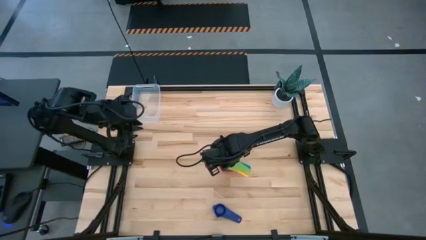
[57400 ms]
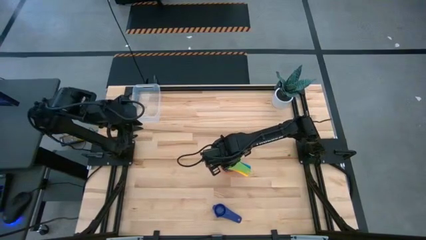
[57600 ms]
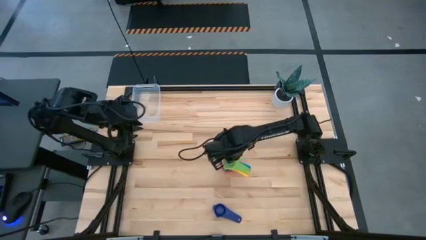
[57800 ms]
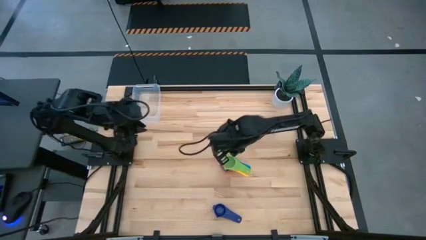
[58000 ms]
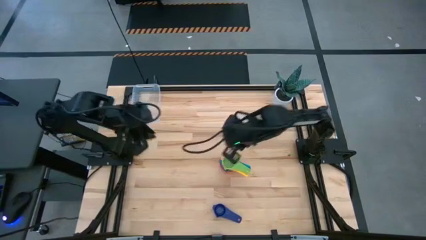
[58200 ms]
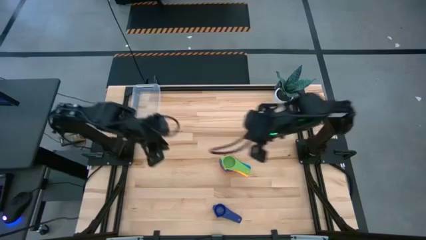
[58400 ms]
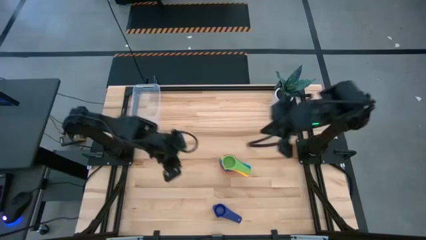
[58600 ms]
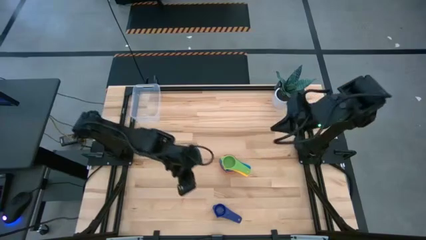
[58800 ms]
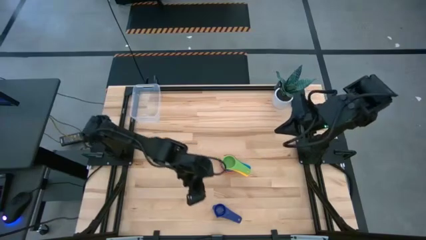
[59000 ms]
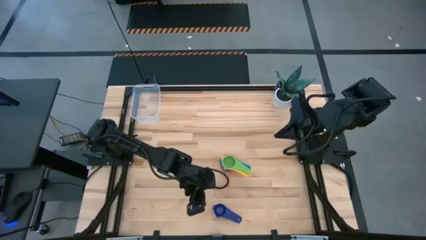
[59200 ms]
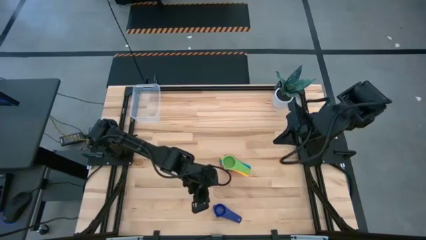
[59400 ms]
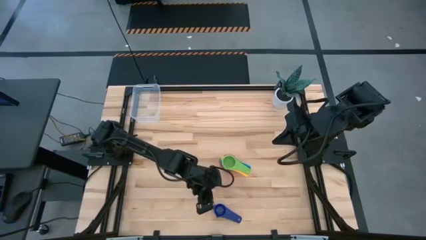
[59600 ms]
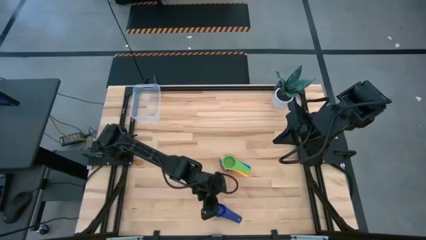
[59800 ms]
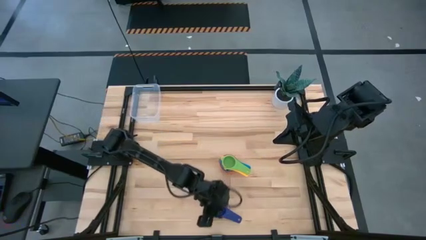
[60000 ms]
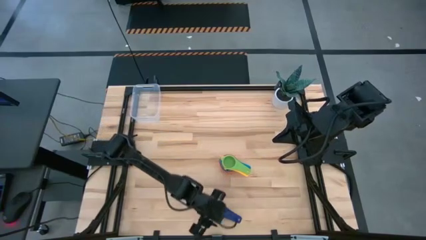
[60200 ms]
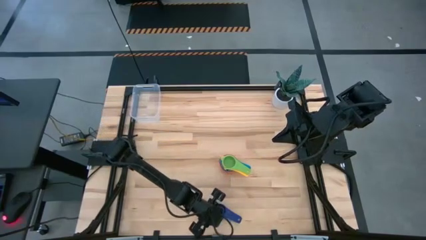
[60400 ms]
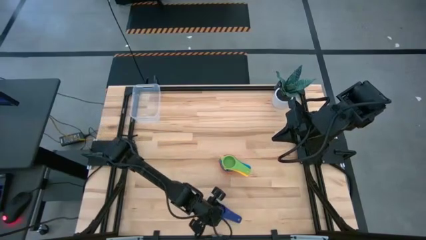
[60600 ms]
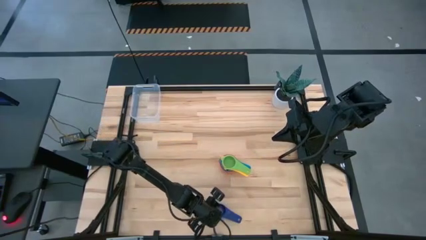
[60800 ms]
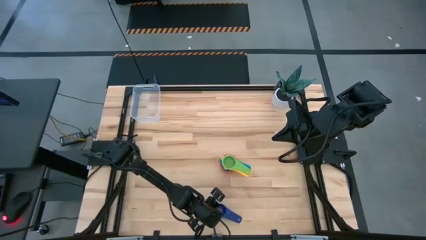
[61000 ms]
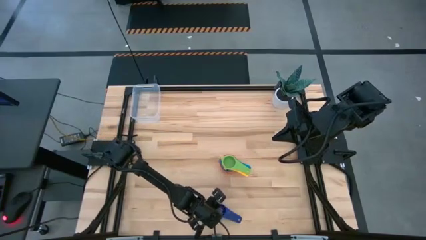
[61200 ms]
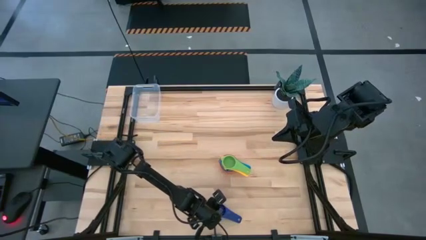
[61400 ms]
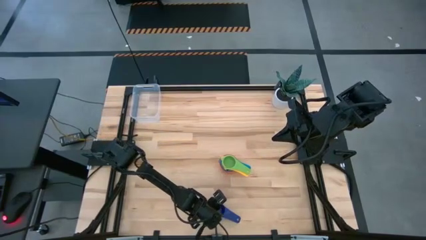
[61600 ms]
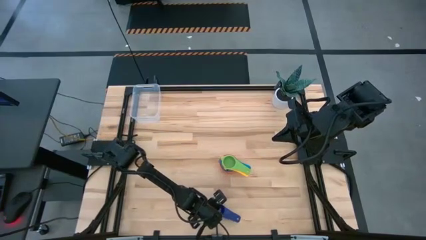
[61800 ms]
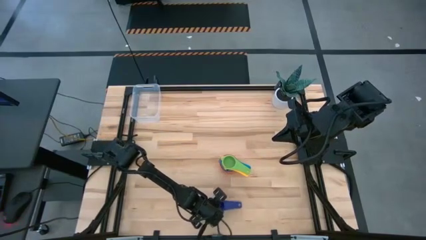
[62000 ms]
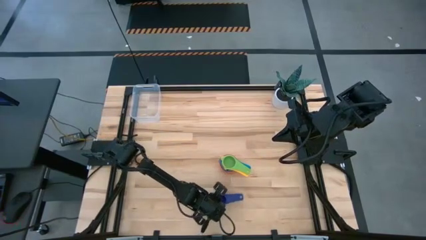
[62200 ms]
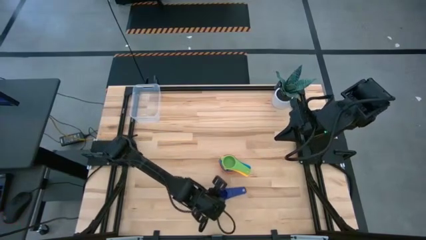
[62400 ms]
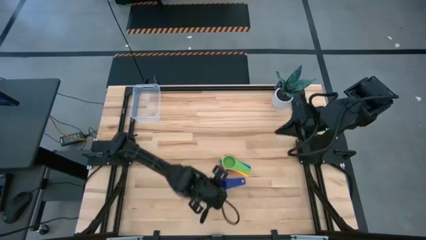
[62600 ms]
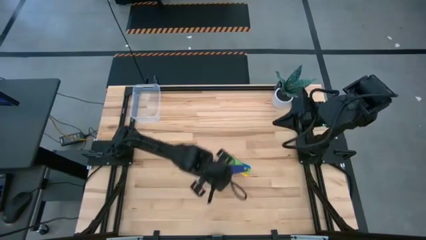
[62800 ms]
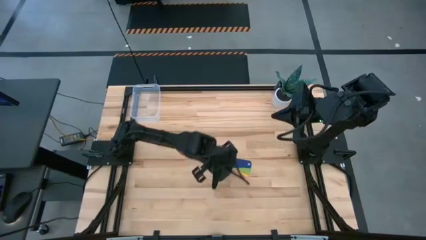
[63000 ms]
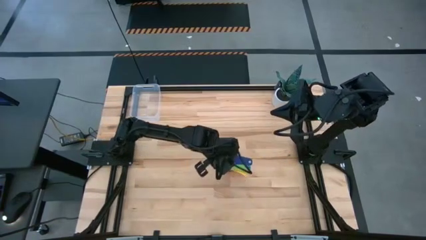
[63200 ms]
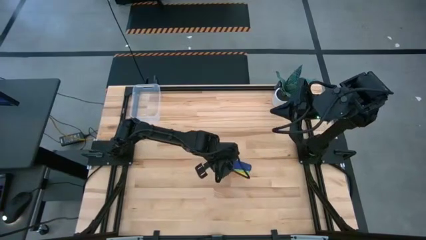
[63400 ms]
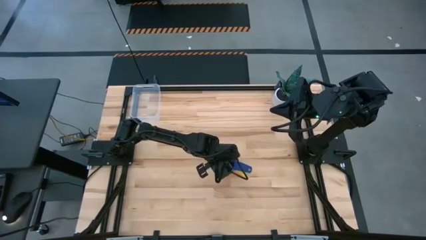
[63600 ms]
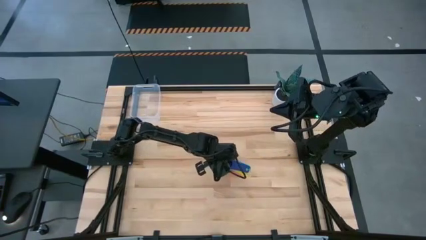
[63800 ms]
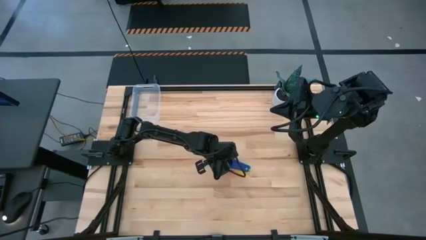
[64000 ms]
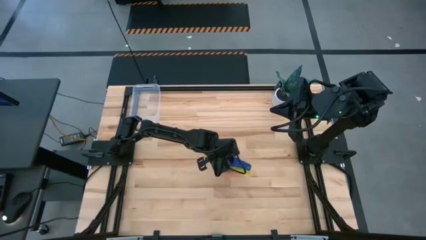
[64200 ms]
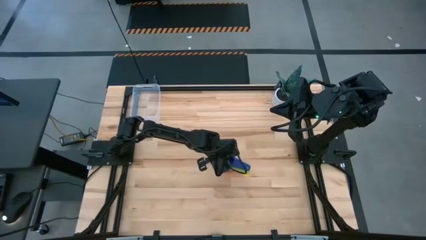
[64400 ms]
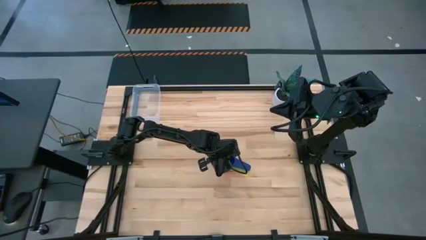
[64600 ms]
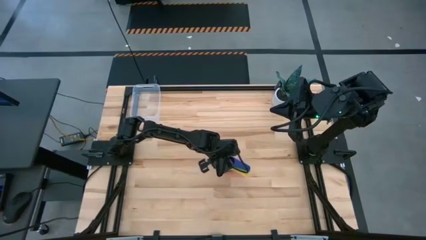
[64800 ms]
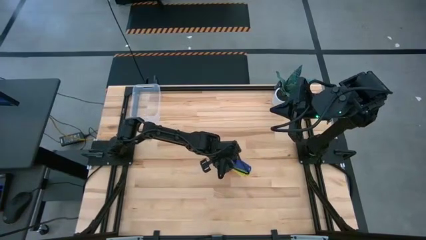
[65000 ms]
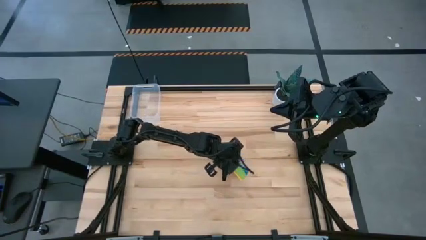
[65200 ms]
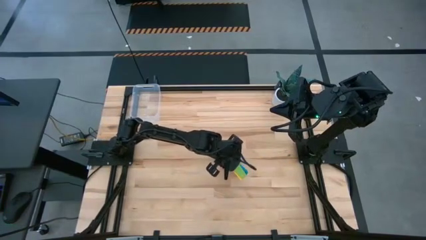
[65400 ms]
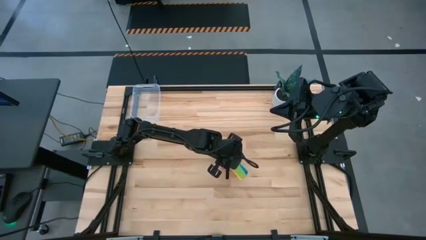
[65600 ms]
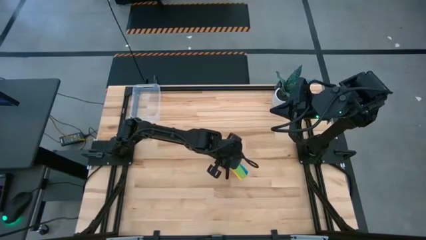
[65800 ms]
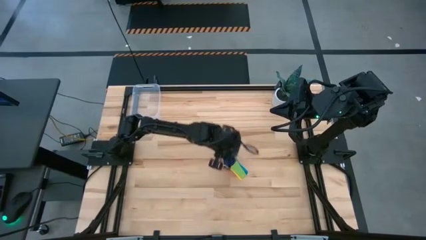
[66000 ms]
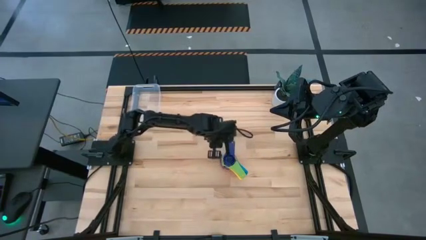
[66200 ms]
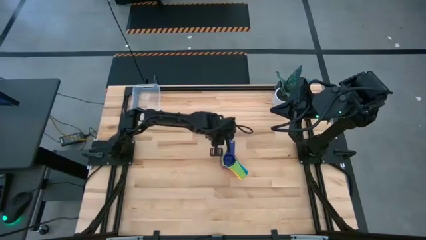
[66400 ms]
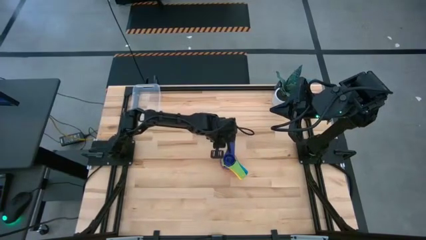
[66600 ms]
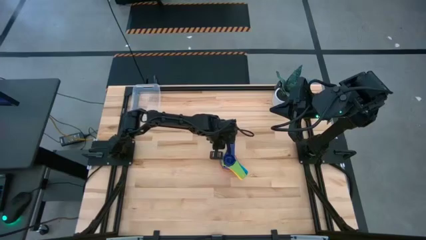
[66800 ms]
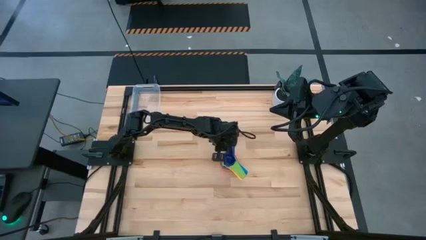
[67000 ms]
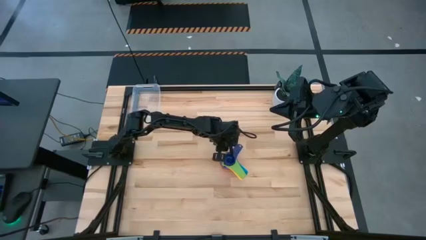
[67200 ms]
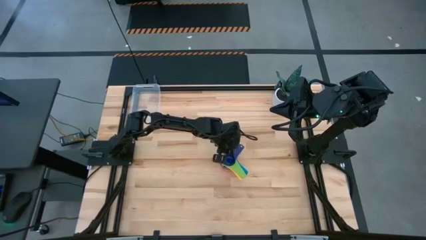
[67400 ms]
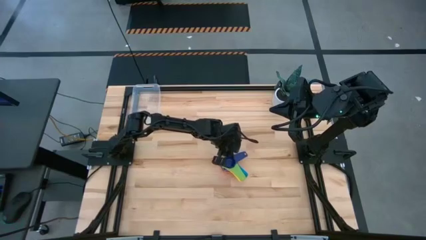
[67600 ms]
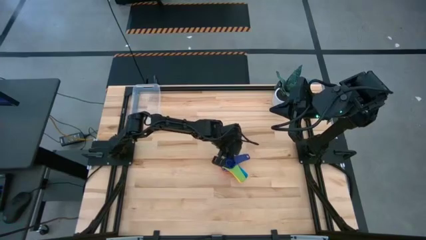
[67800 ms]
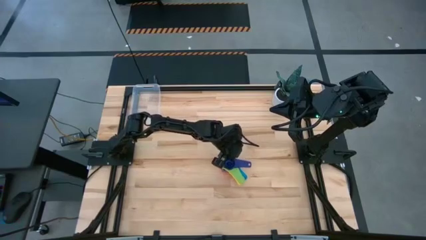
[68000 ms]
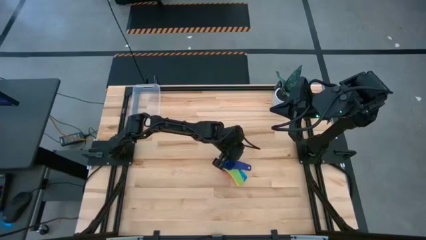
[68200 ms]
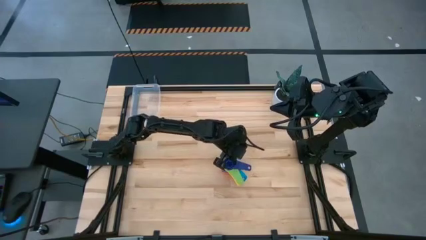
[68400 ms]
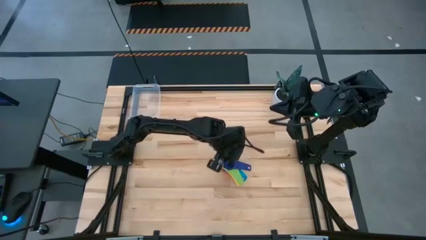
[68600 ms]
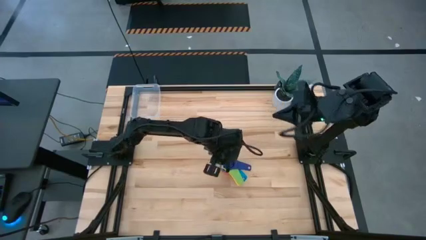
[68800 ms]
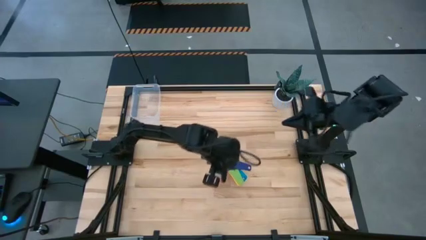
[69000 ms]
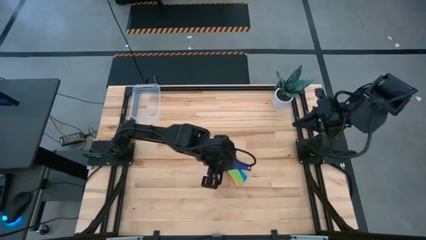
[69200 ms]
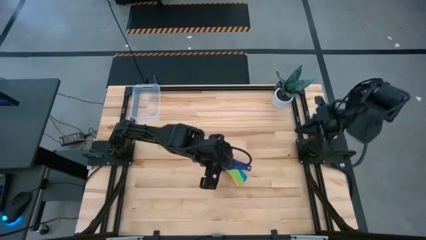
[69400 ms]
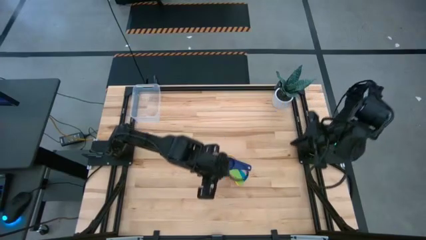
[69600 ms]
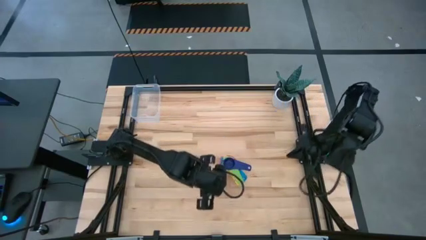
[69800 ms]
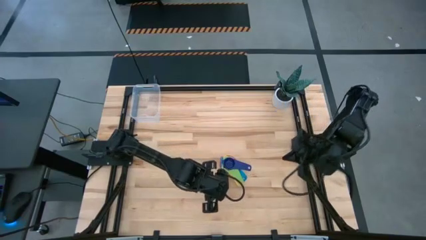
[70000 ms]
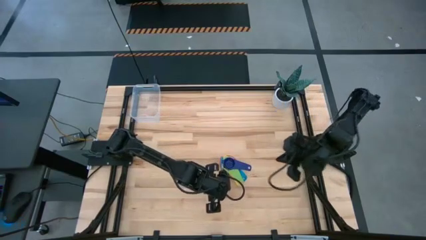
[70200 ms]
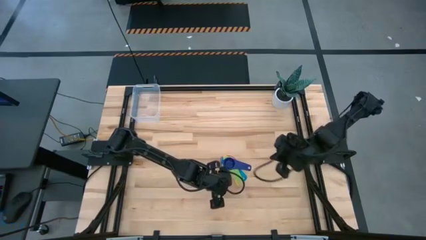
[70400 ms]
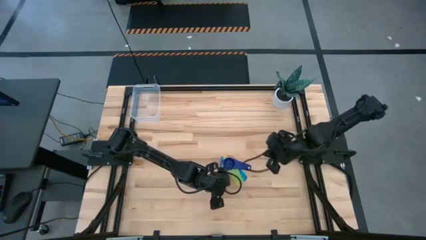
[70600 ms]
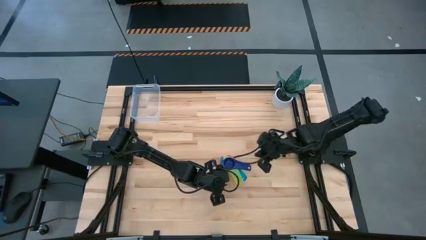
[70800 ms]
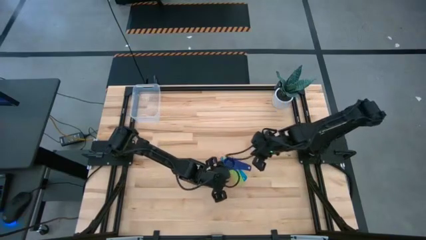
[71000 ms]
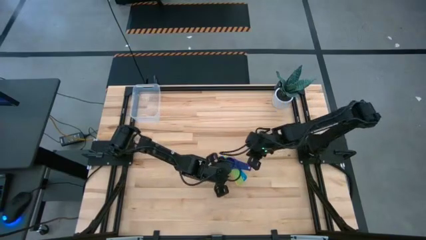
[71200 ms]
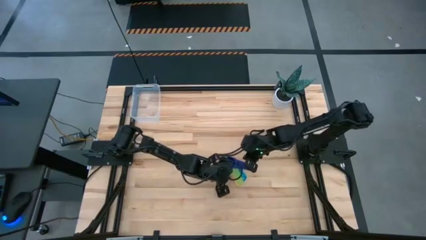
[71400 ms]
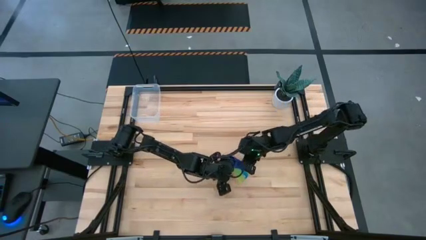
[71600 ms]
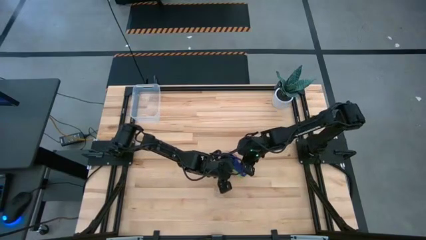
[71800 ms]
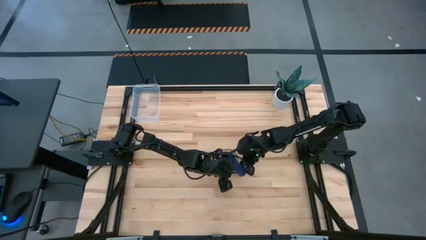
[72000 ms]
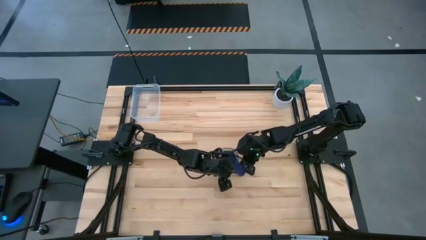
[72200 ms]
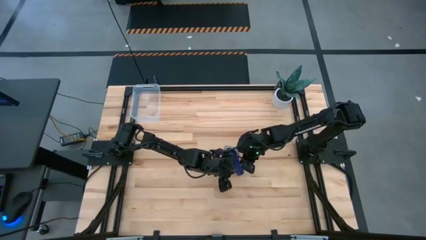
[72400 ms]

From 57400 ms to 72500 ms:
Task: Nest measuring cups in basket
Stack the dark blue measuring cup on top of the green measuring cup
